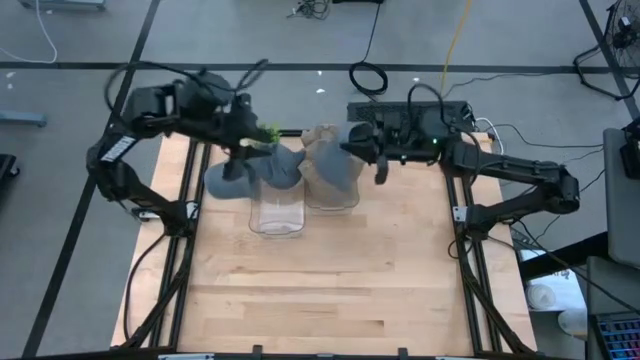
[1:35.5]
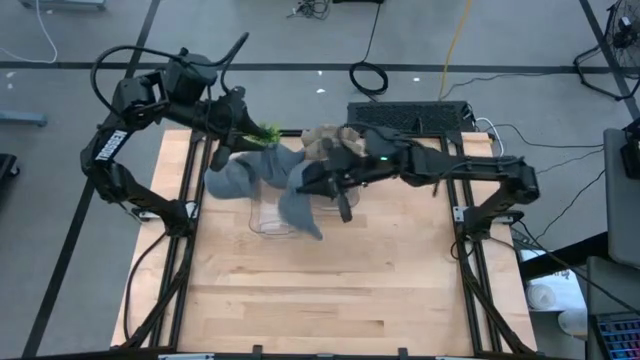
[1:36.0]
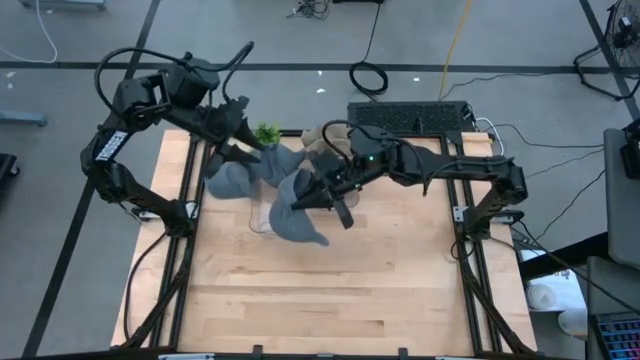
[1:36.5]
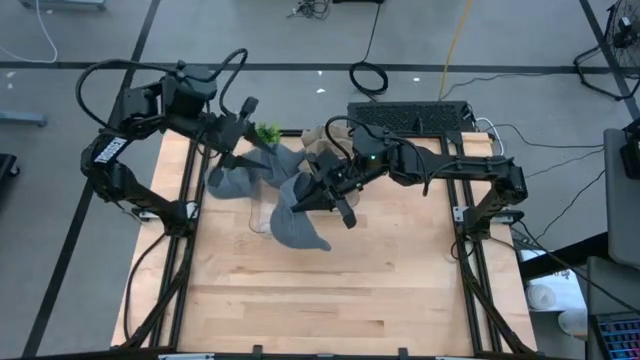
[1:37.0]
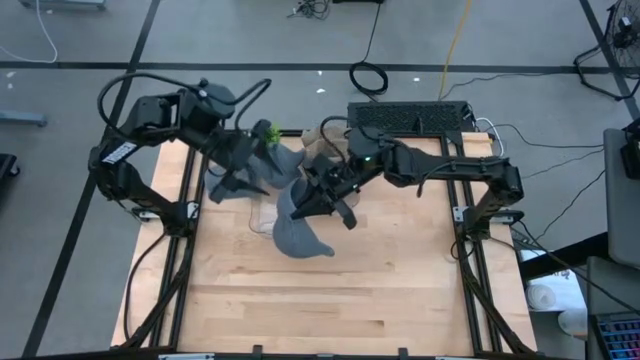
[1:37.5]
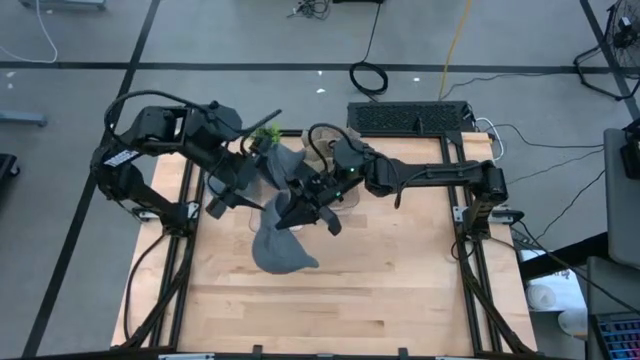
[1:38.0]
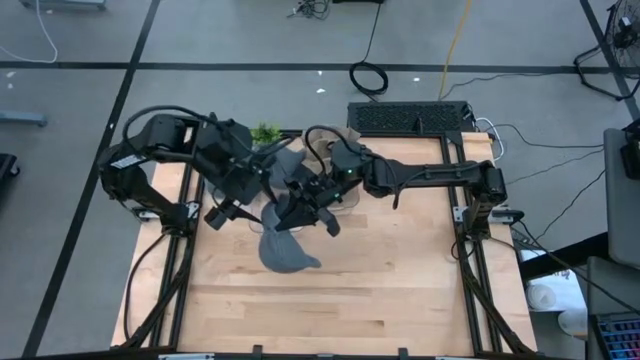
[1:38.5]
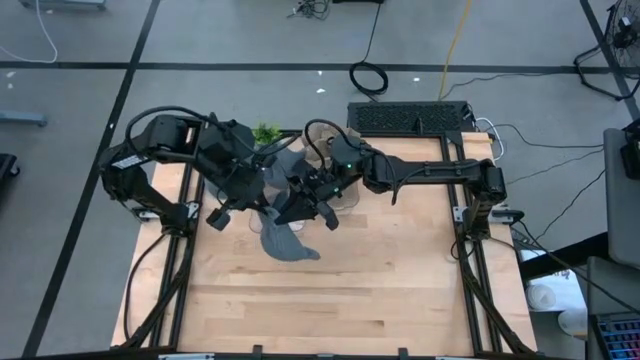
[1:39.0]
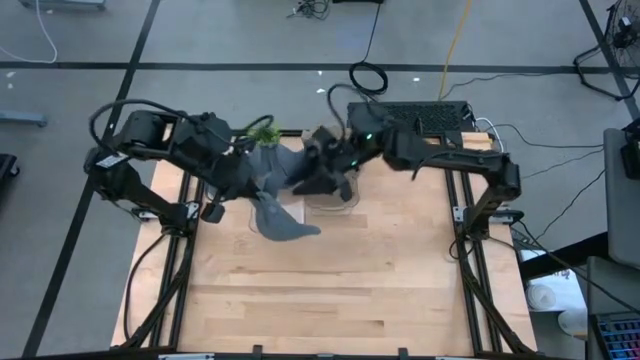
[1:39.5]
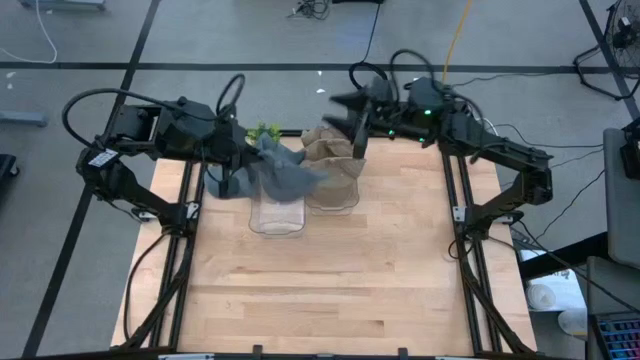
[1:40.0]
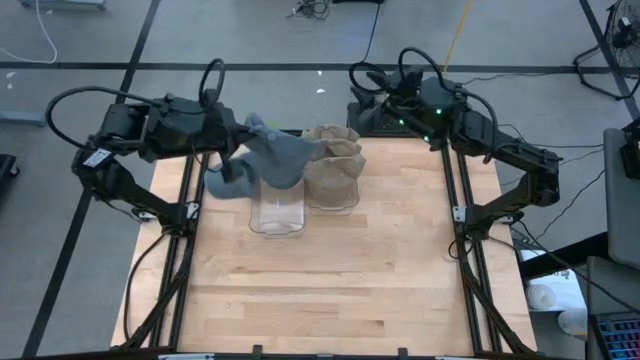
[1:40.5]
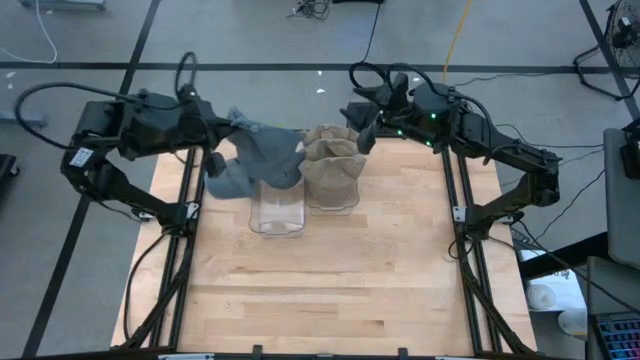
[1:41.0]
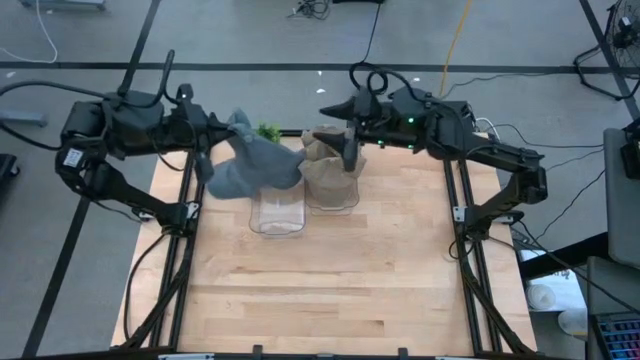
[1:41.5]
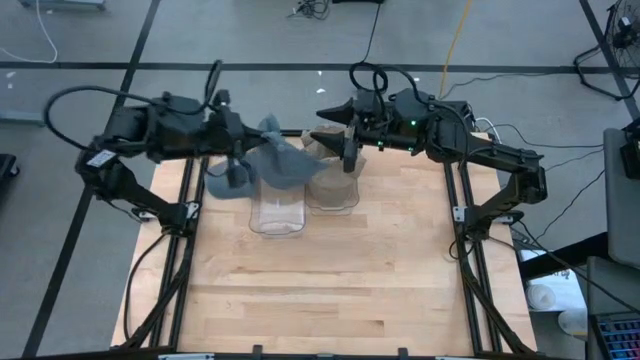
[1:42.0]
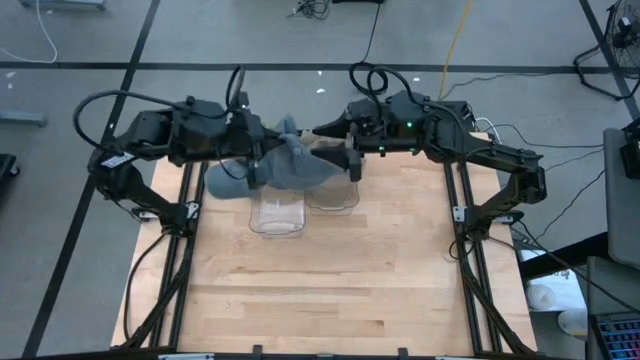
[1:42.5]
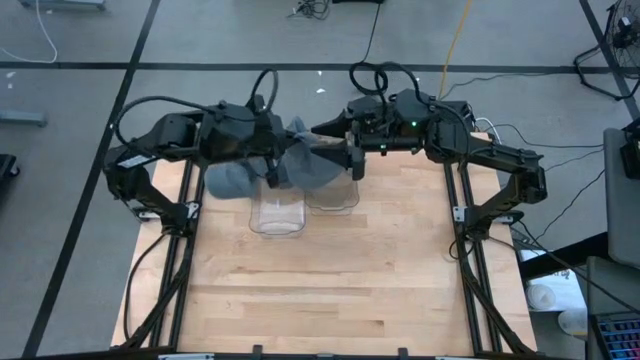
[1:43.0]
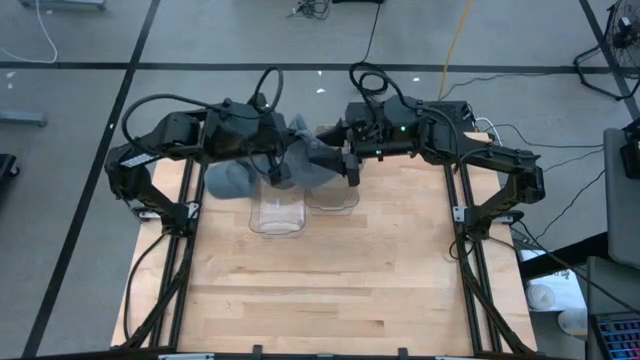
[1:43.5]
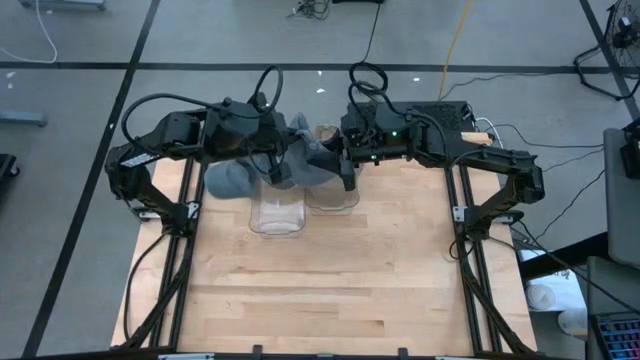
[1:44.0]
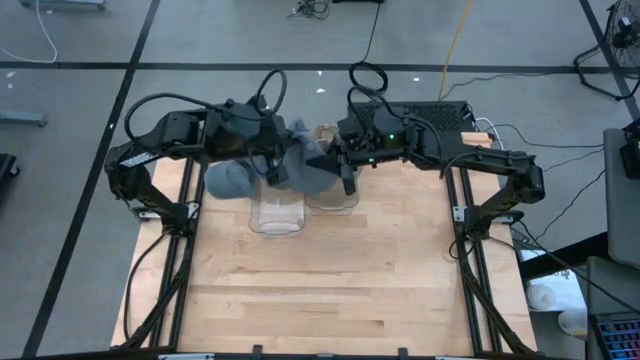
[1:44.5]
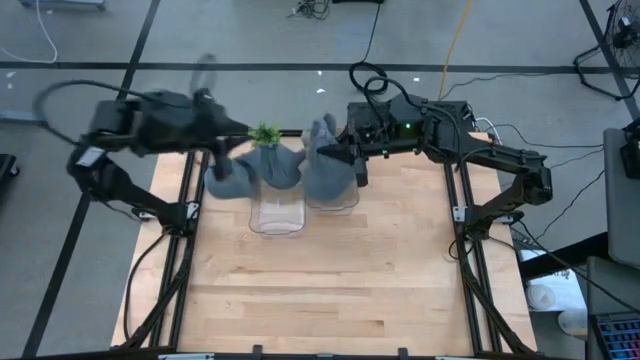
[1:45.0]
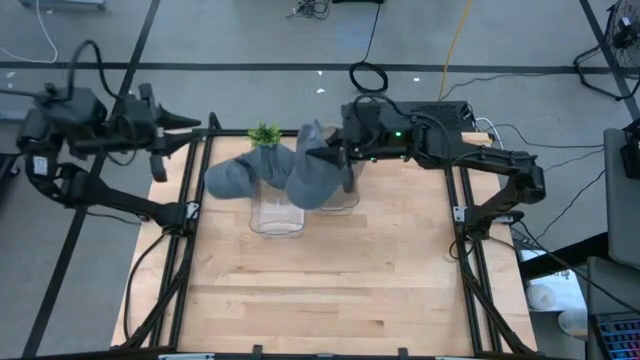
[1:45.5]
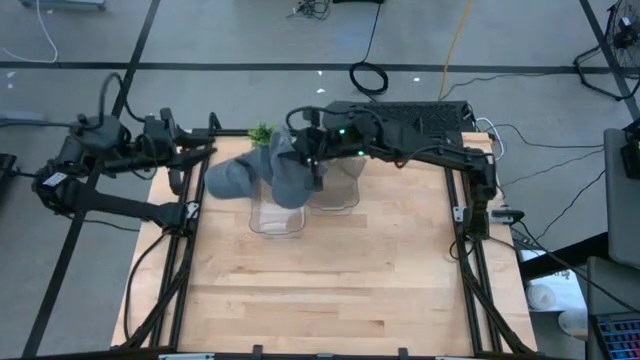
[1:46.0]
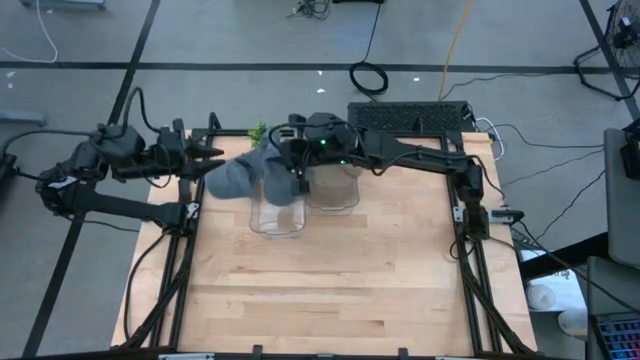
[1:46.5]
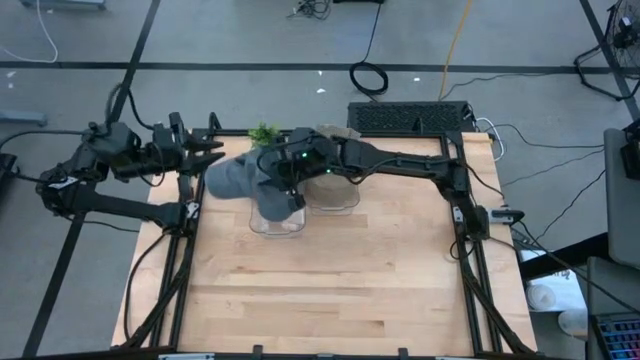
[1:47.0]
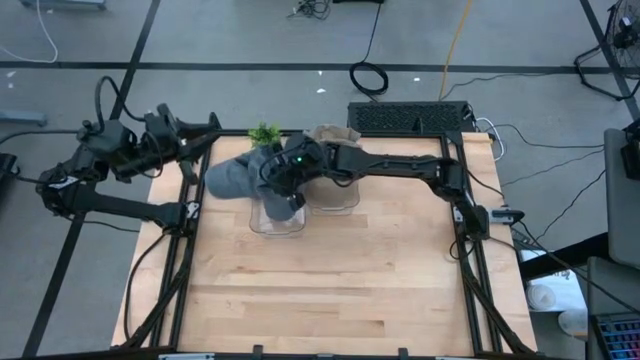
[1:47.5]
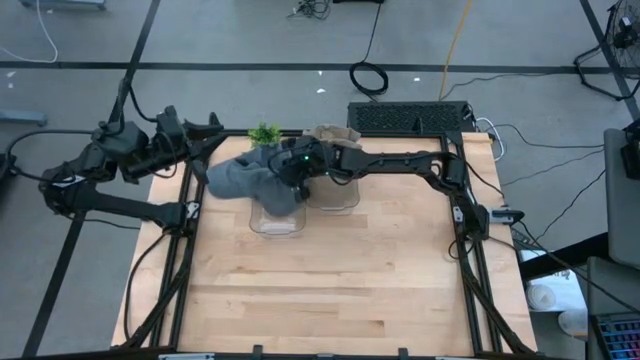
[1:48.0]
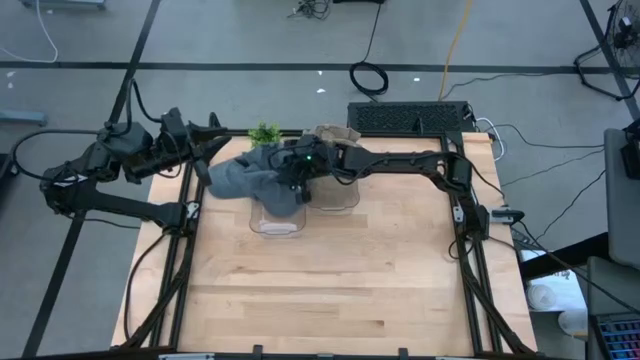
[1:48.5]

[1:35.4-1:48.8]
Task: Pick & Place hat
Put the bottom blue cap into the left transparent bin

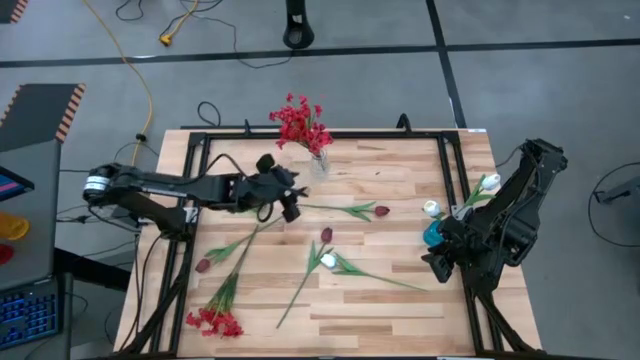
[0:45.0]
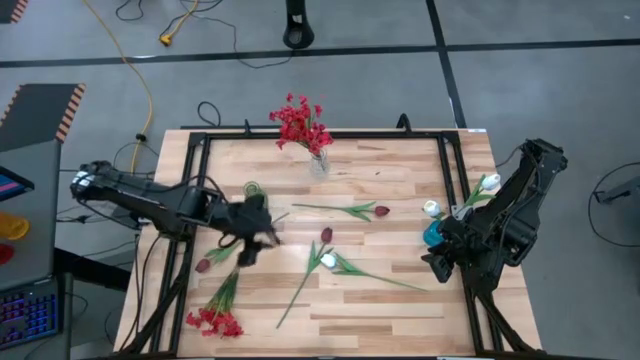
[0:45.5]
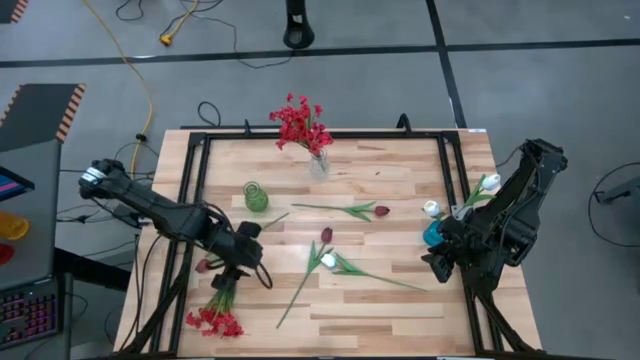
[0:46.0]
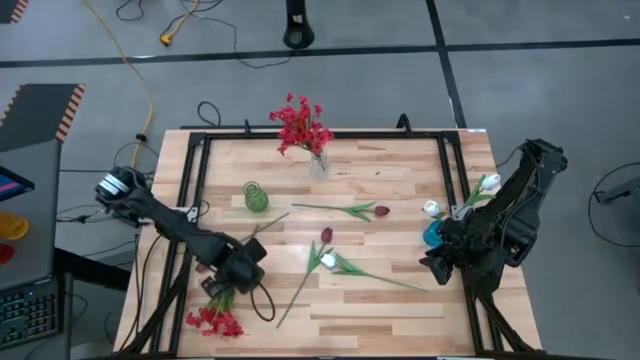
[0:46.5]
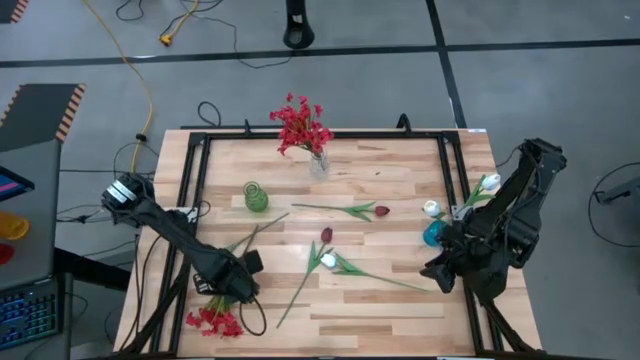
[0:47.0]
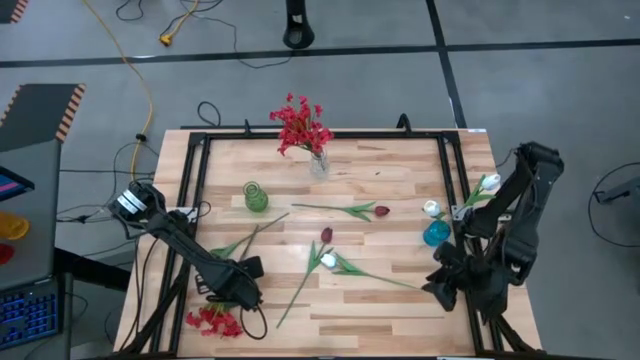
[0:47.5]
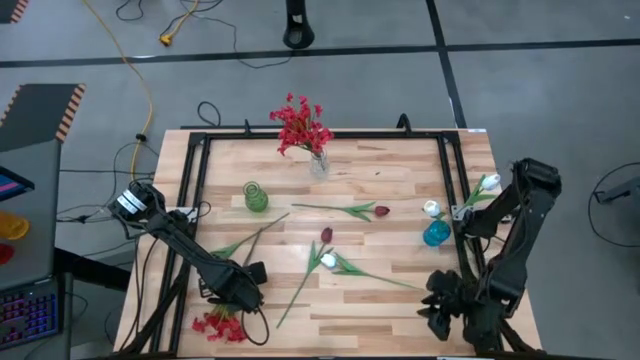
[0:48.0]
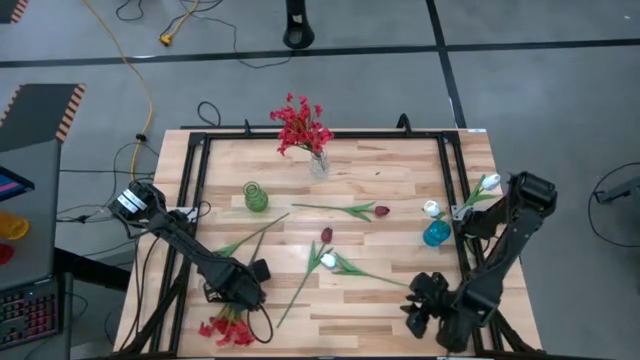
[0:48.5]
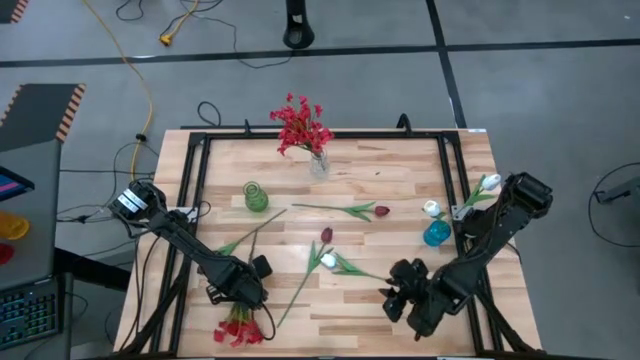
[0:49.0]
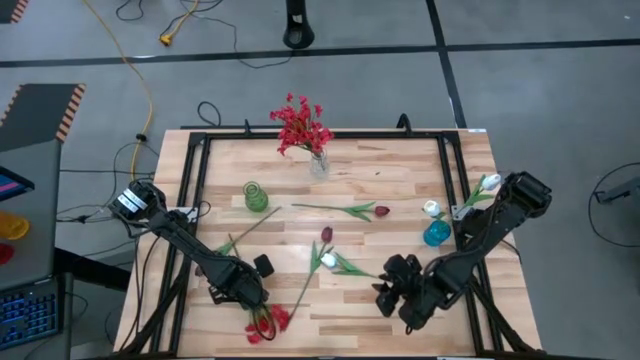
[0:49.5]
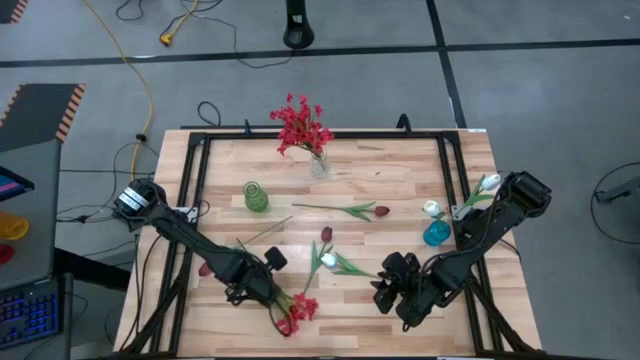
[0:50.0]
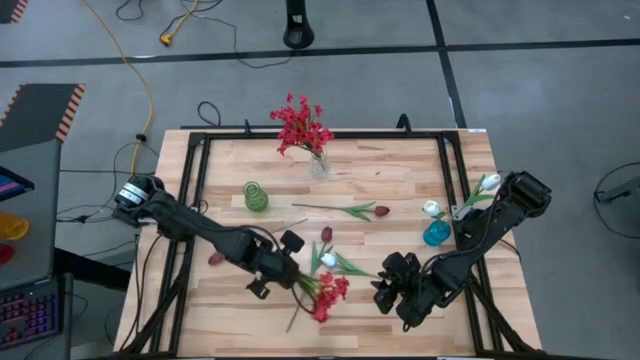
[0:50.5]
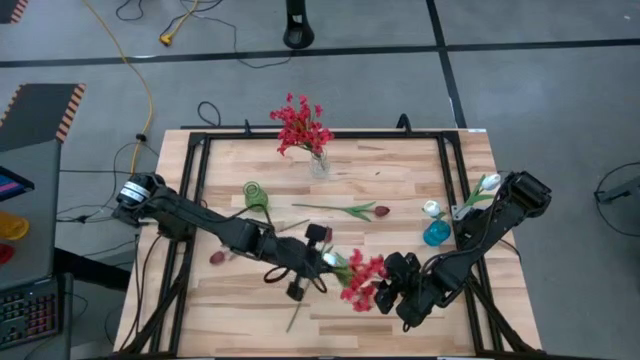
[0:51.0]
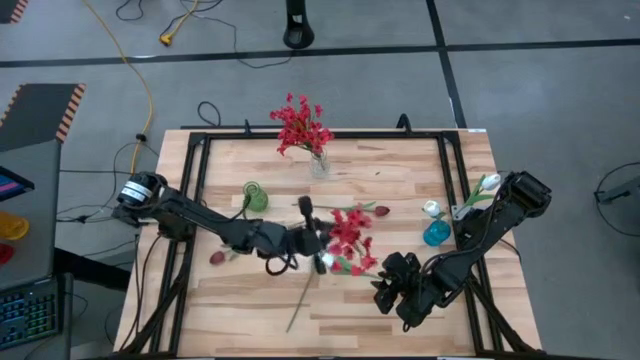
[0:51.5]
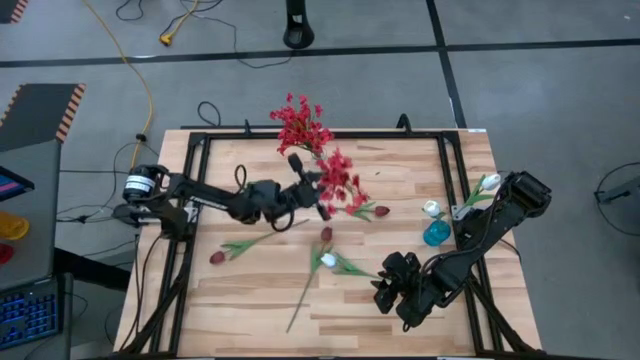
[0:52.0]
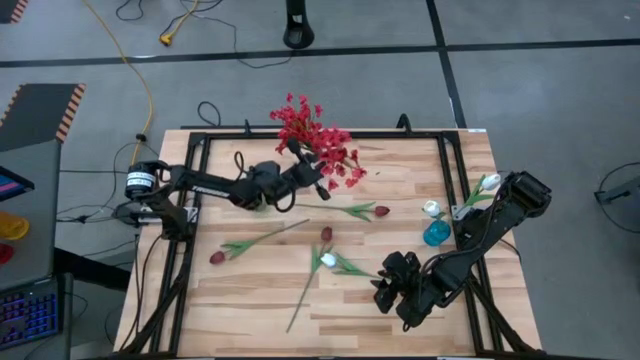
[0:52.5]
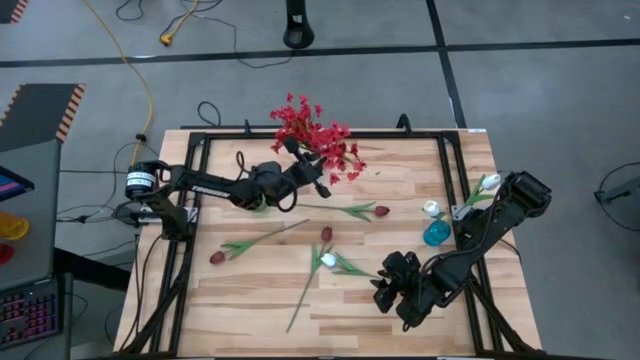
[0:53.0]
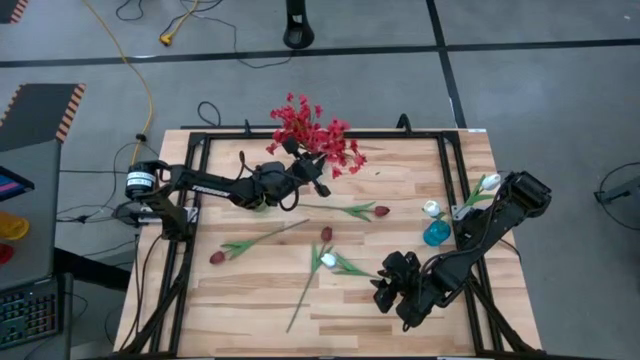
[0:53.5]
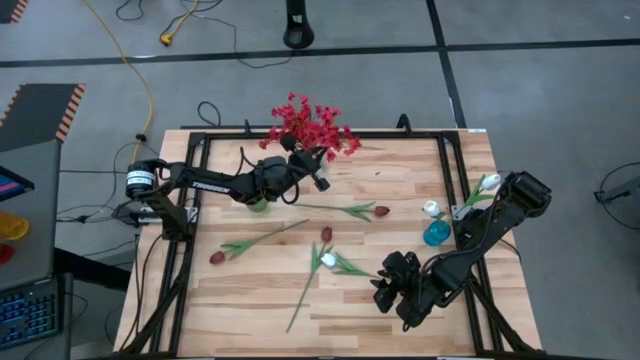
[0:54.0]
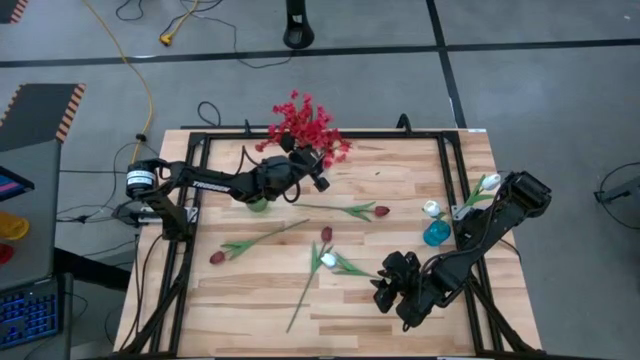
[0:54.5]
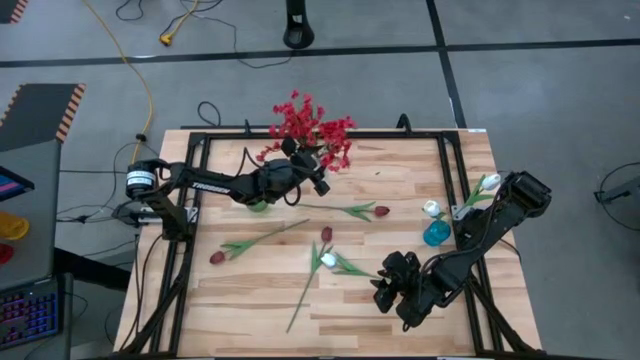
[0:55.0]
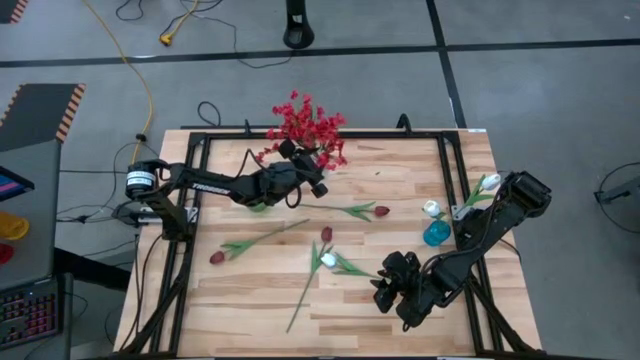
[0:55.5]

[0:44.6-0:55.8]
Task: Sort flowers into vase by color
Put the red flowers into the transparent vase
